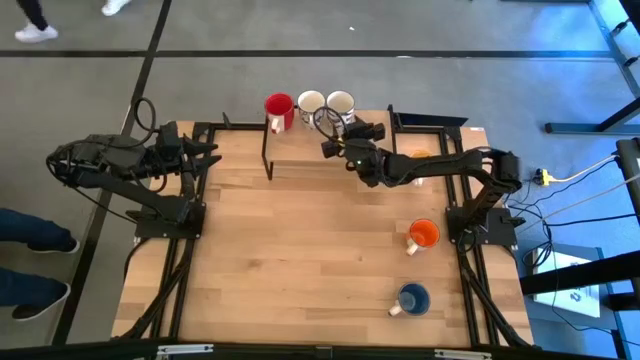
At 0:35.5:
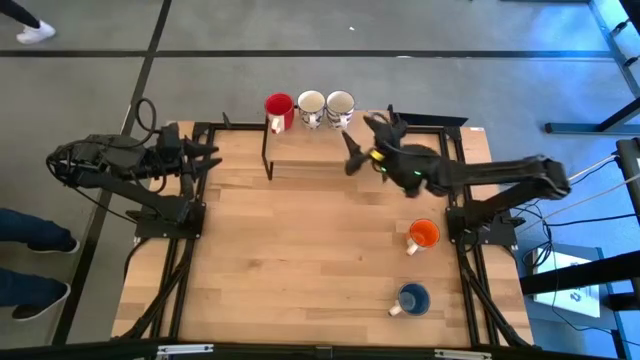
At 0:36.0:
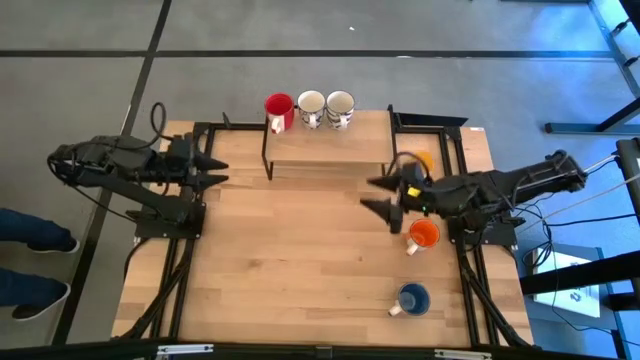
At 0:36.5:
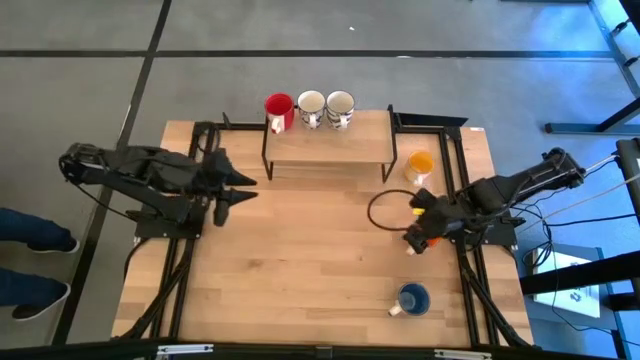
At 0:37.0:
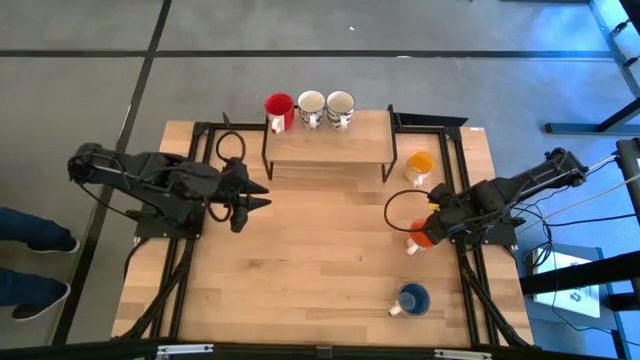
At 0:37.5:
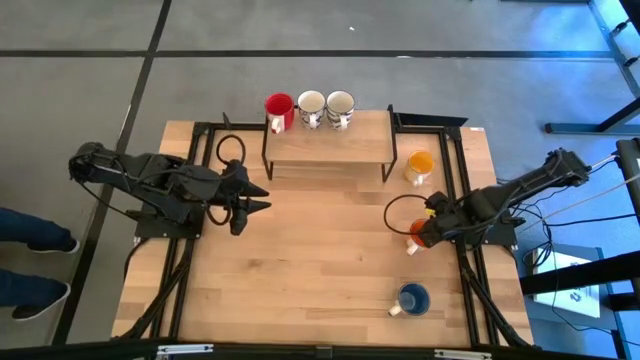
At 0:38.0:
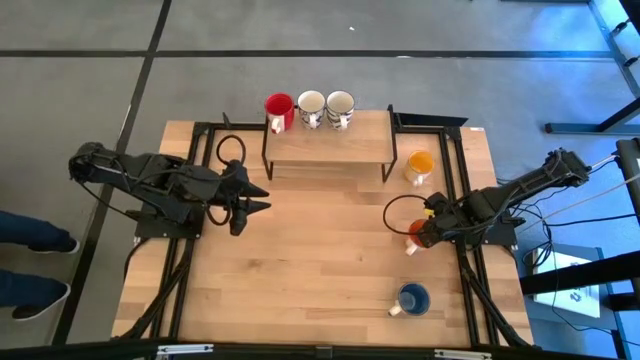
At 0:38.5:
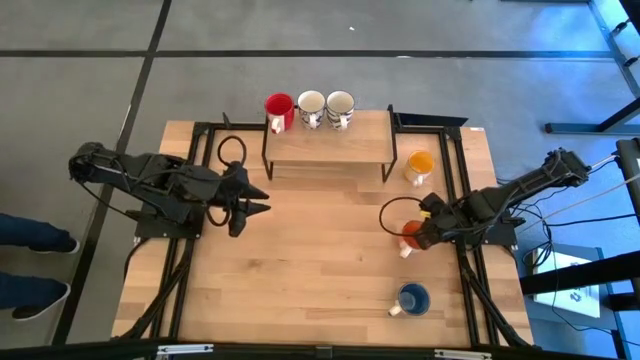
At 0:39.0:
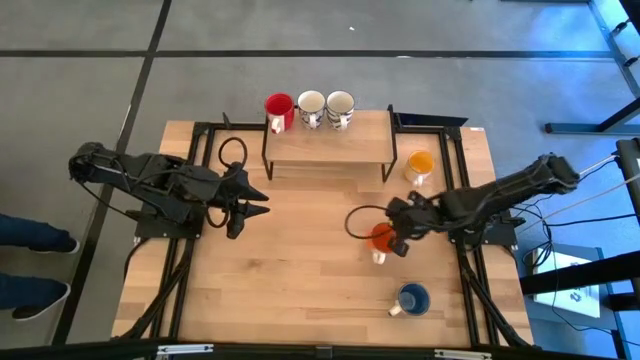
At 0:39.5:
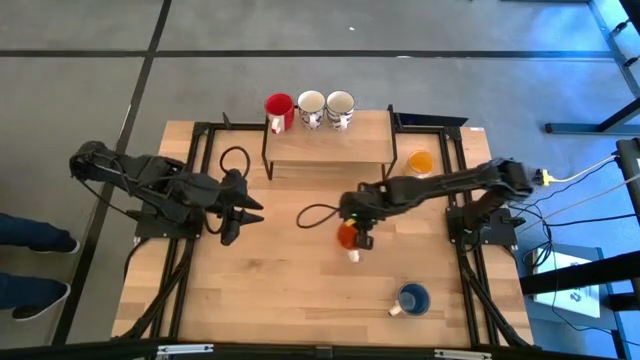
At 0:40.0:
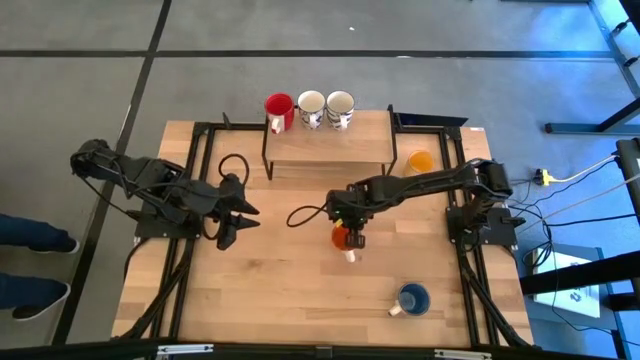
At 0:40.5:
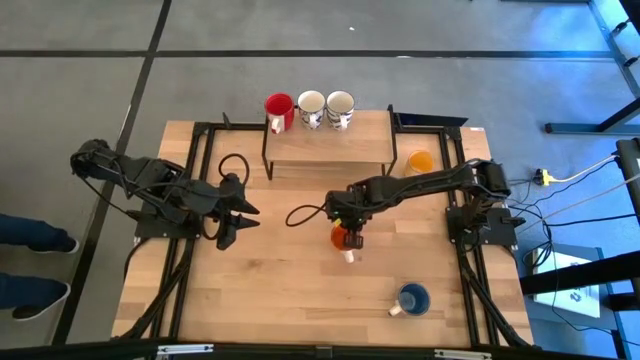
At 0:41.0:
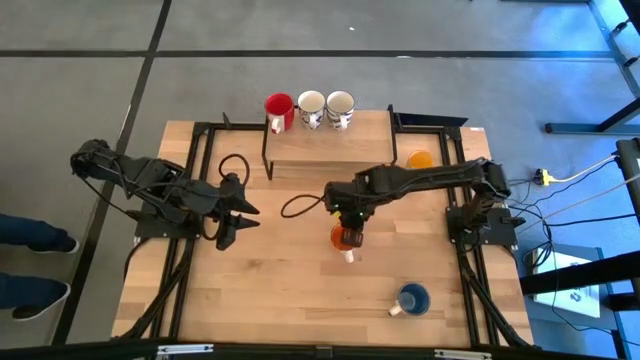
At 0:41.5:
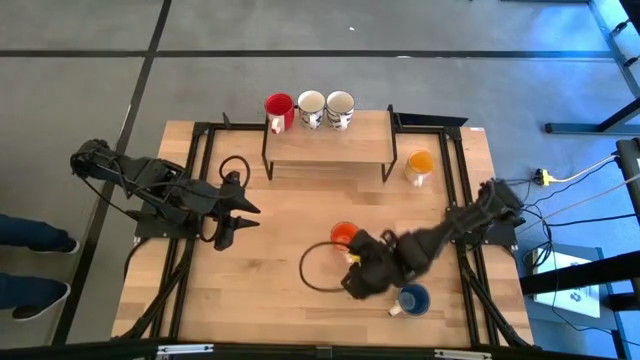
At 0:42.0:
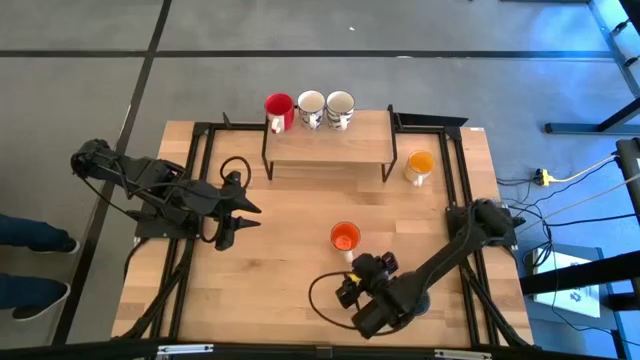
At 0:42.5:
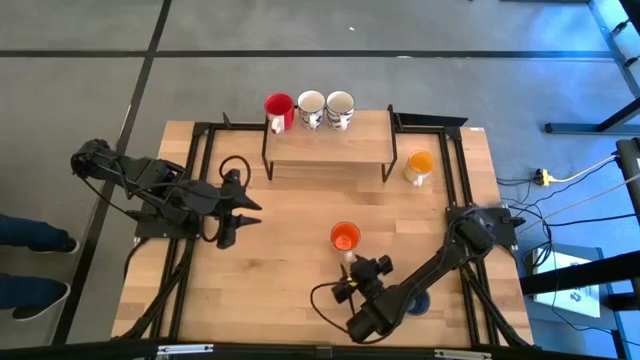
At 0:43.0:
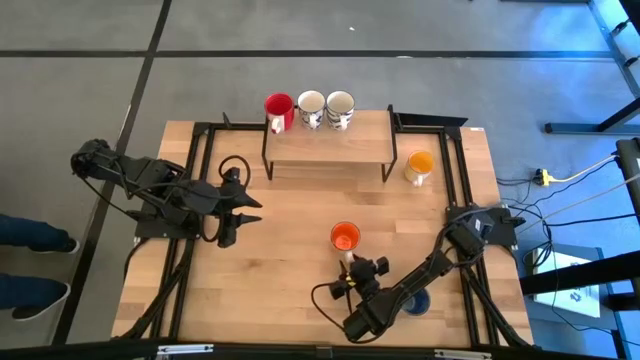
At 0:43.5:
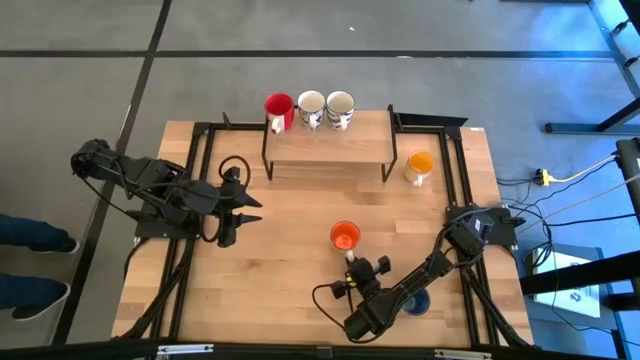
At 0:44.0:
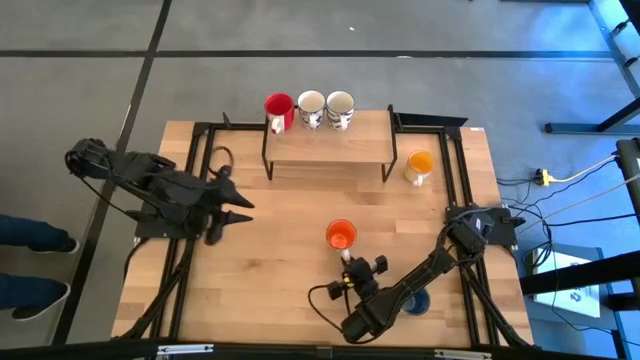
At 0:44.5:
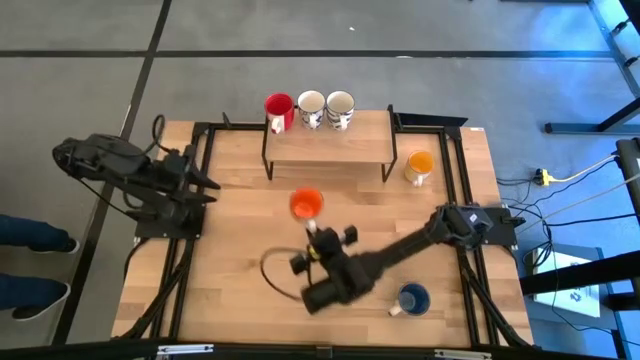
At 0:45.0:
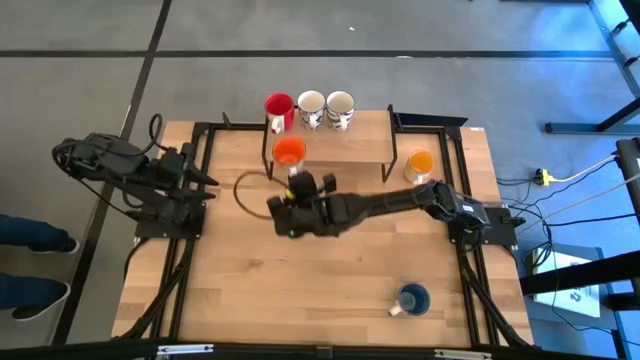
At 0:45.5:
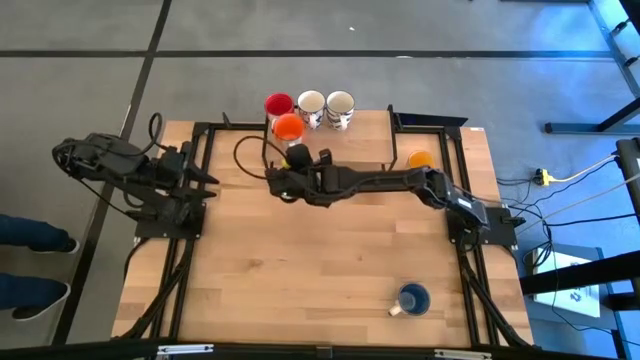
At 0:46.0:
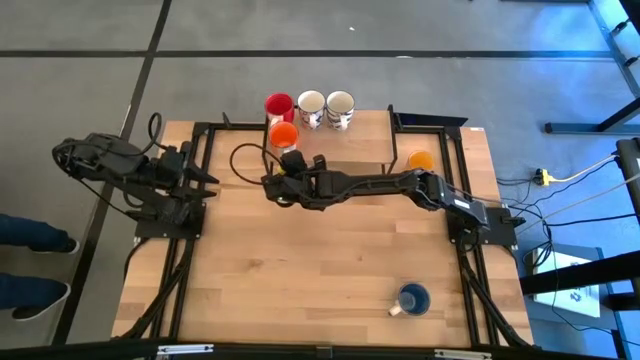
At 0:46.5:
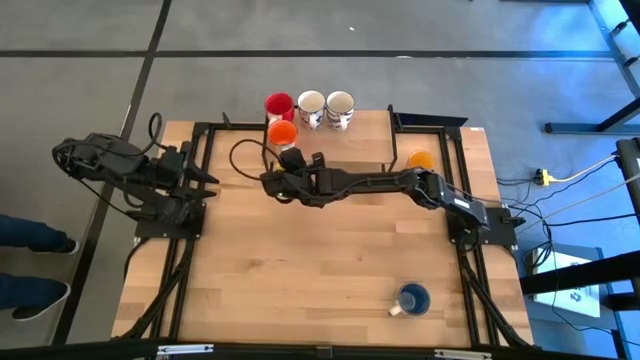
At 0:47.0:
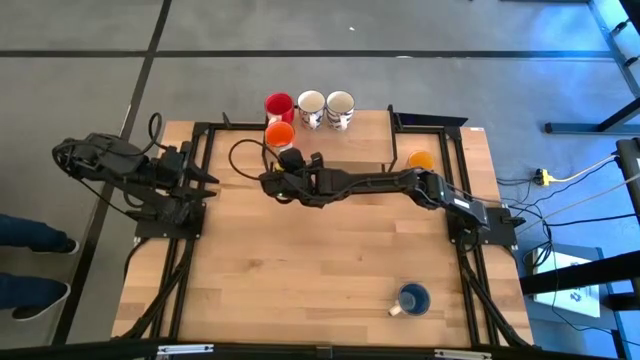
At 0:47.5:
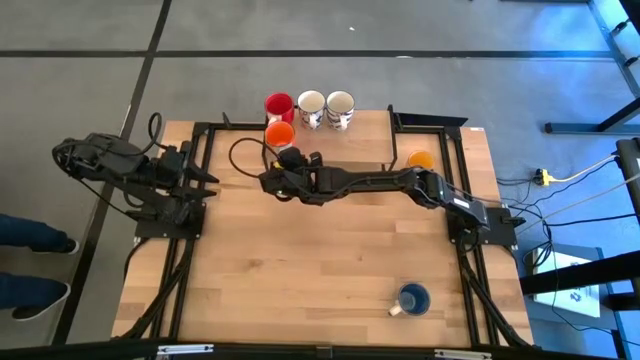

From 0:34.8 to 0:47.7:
Task: Place coffee mugs
Put the orange cup on the shelf

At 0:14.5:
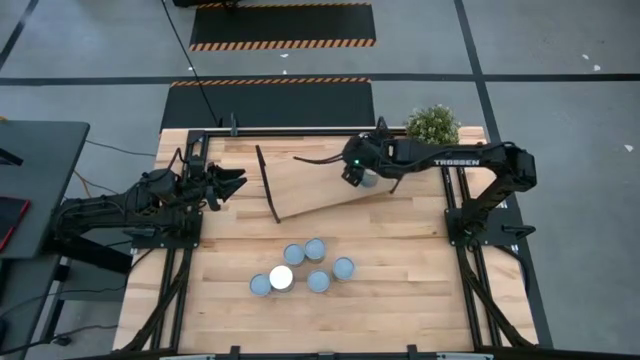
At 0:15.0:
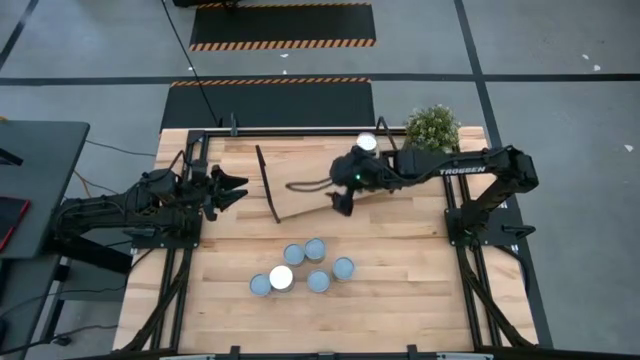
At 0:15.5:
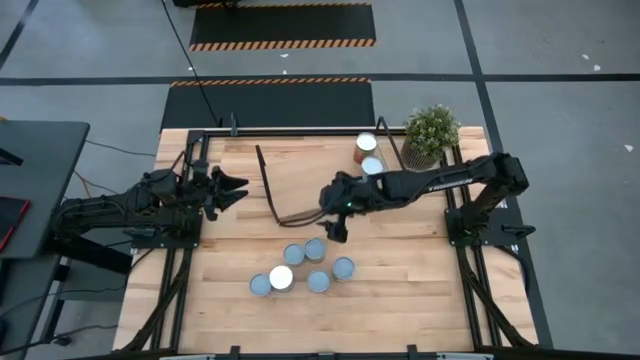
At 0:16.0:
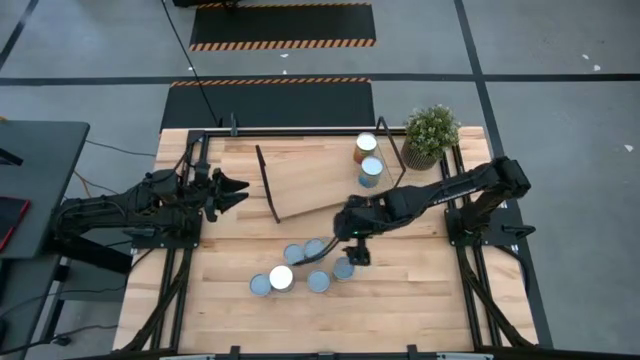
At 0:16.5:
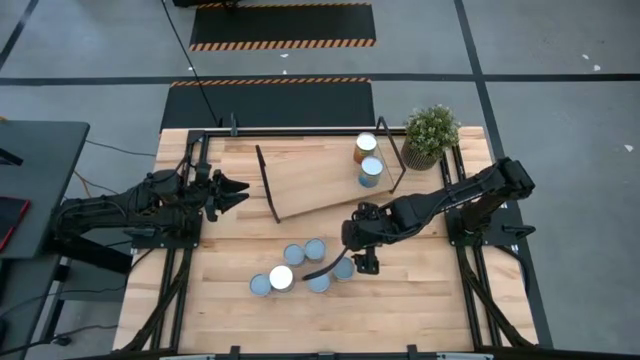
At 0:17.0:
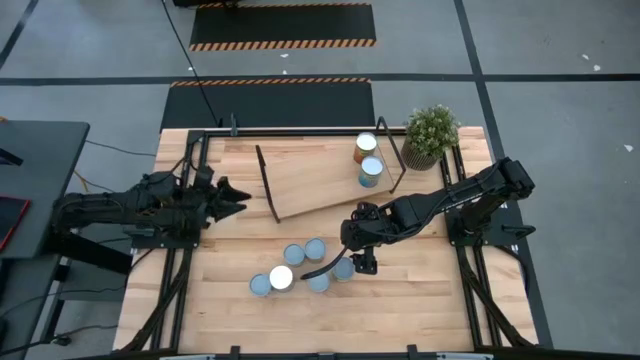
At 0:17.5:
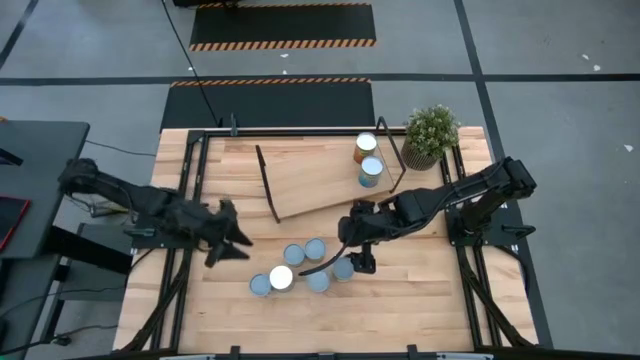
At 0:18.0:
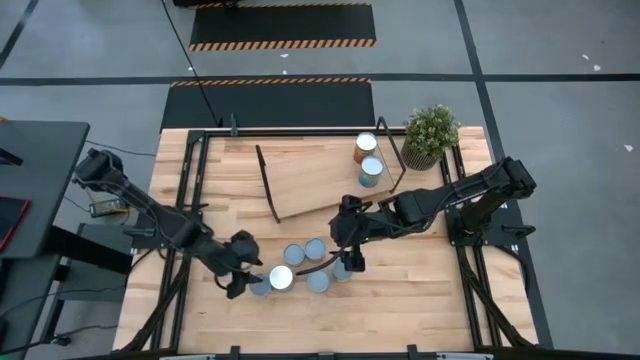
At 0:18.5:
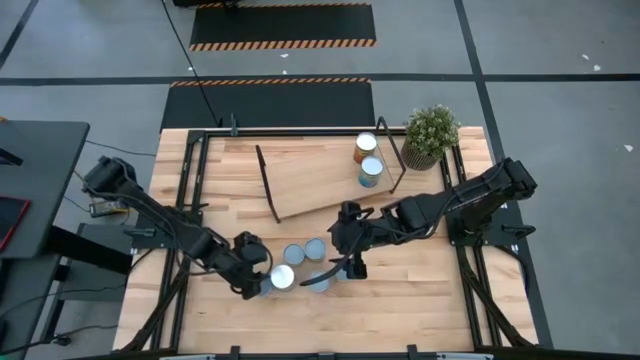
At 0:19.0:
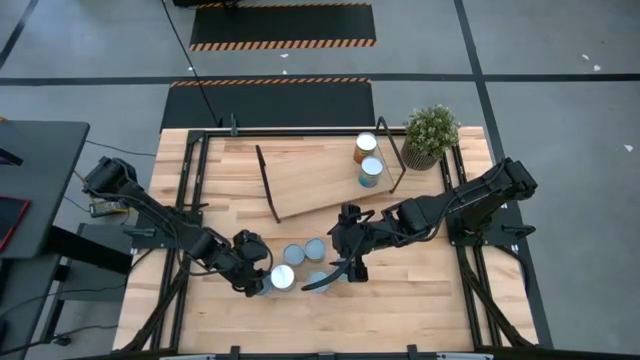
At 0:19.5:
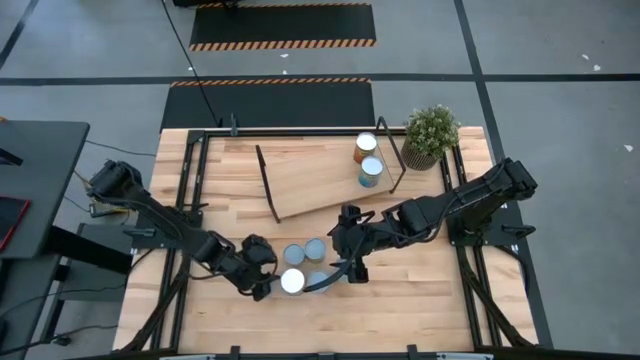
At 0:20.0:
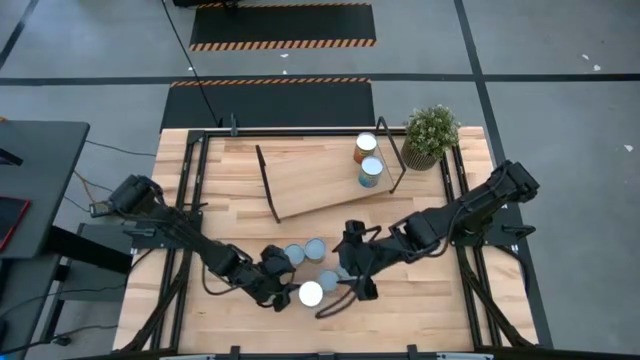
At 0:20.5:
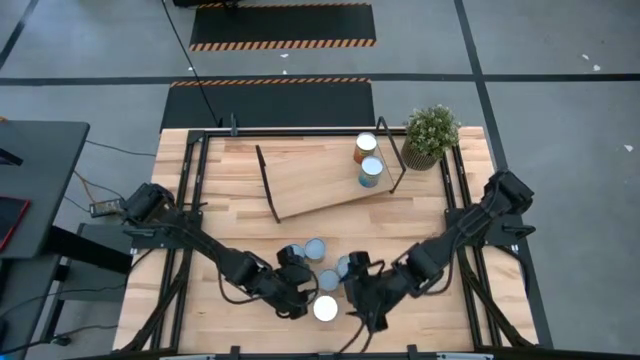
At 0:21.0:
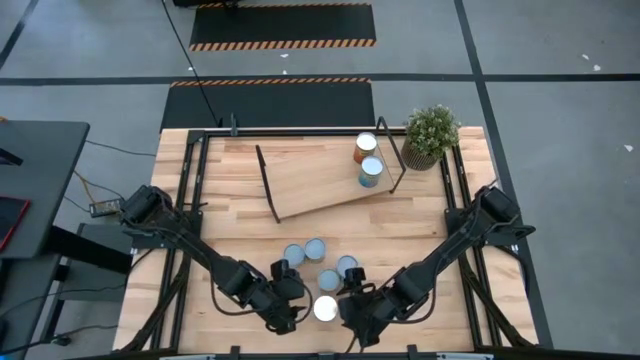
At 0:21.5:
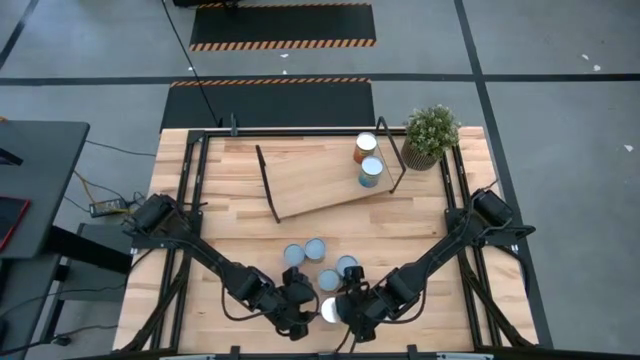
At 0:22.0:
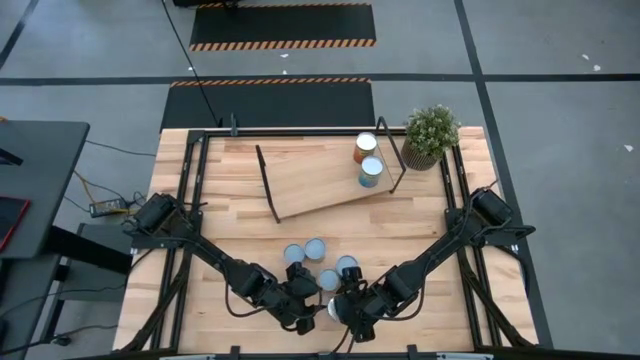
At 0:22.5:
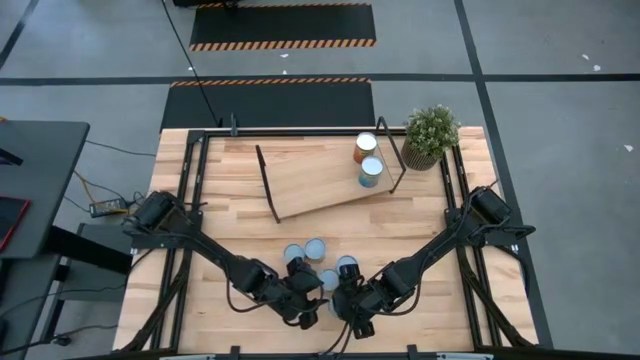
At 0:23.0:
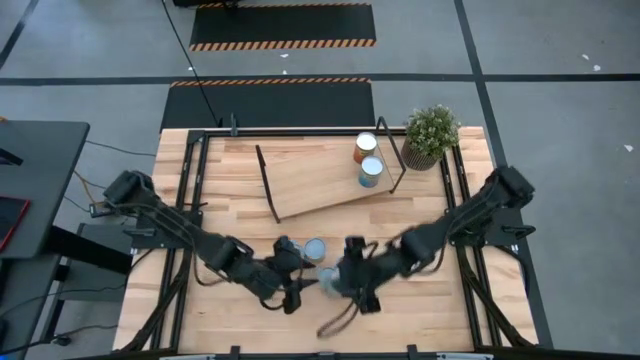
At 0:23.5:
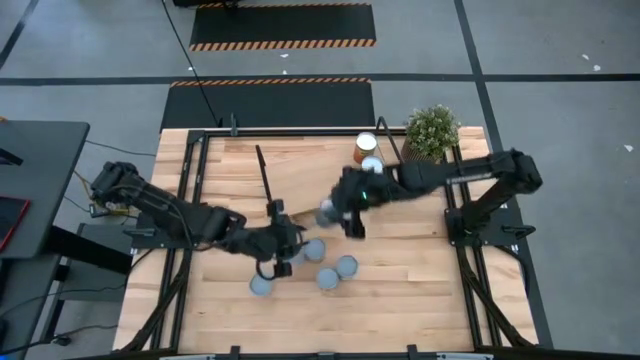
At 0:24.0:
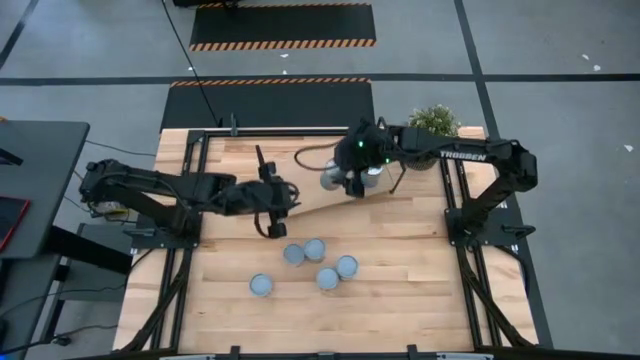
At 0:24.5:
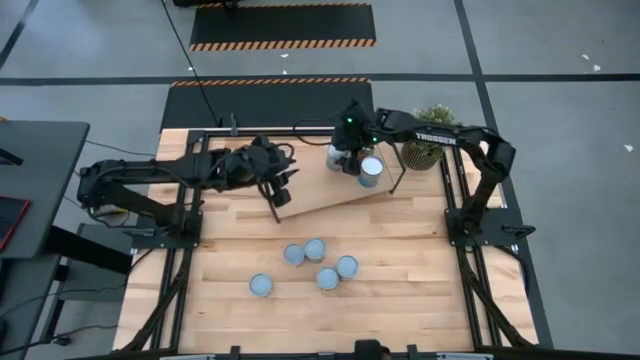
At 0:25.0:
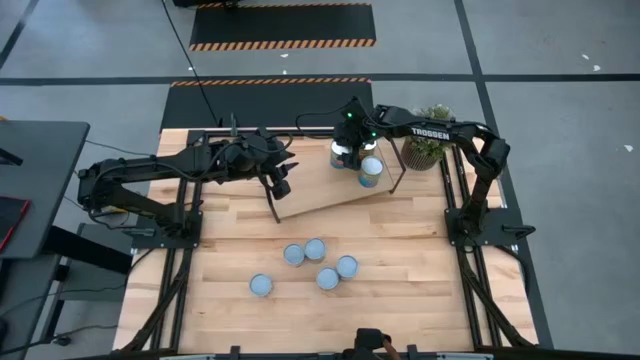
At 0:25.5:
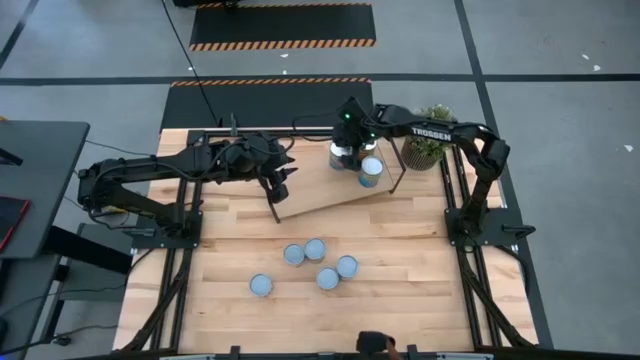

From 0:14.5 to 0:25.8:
Task: Pick and place cans onto a shelf
Put the canned diced tomatoes on the shelf
